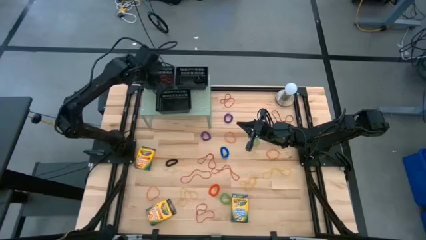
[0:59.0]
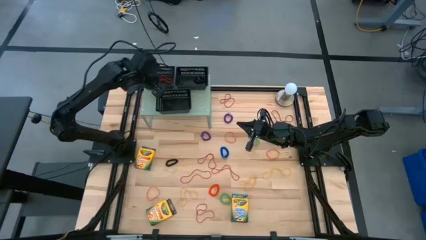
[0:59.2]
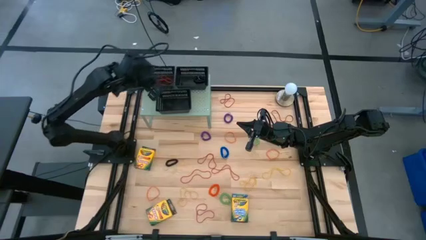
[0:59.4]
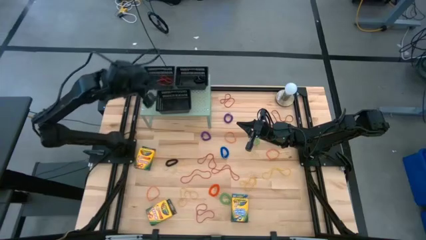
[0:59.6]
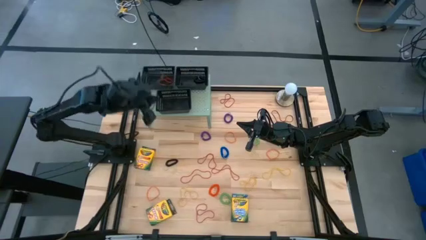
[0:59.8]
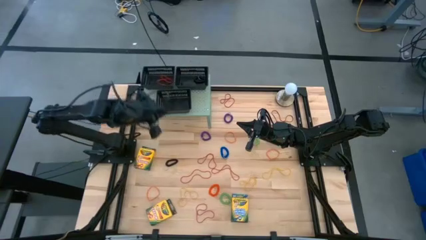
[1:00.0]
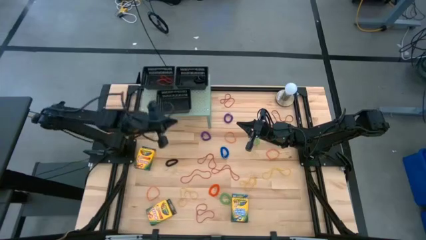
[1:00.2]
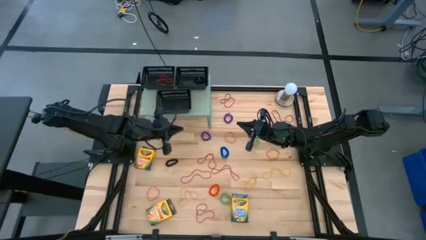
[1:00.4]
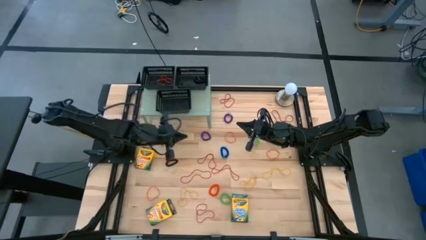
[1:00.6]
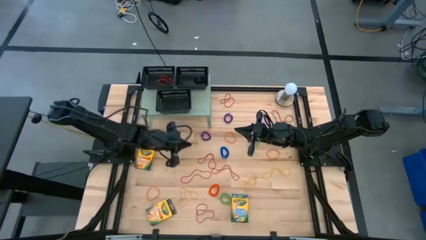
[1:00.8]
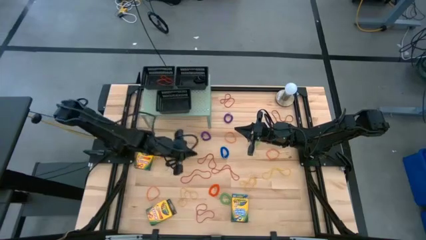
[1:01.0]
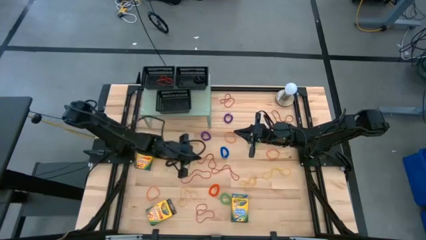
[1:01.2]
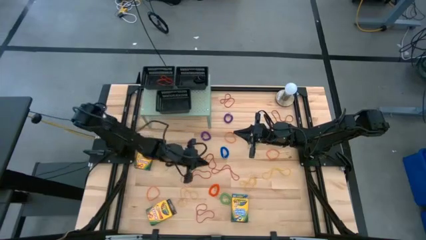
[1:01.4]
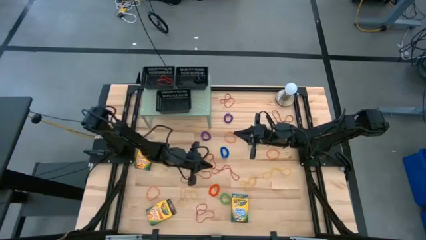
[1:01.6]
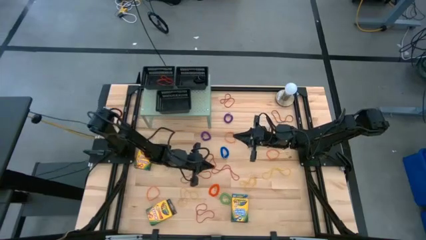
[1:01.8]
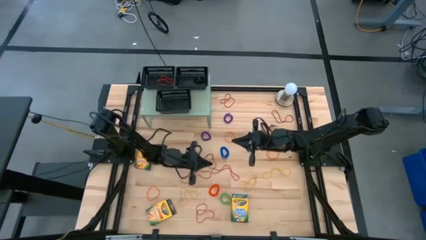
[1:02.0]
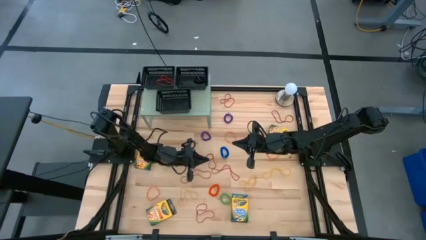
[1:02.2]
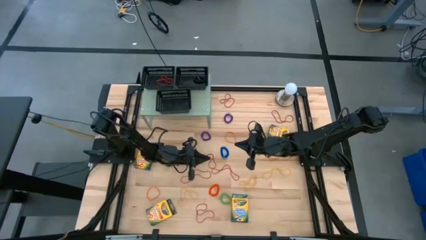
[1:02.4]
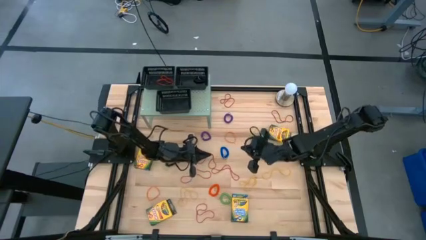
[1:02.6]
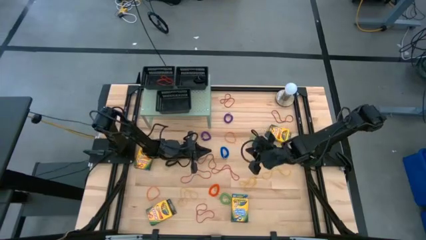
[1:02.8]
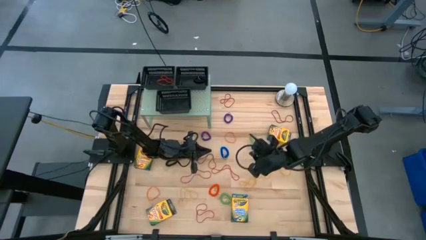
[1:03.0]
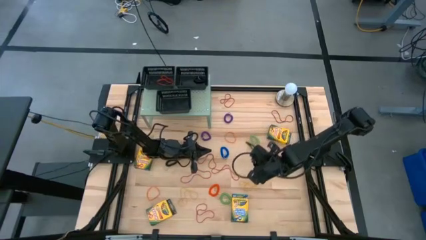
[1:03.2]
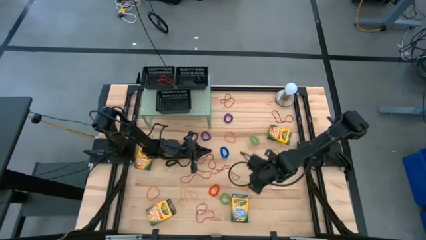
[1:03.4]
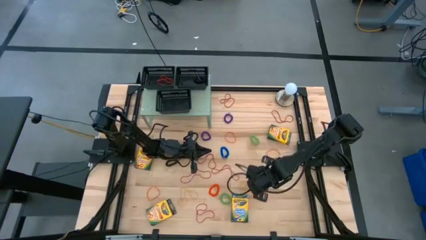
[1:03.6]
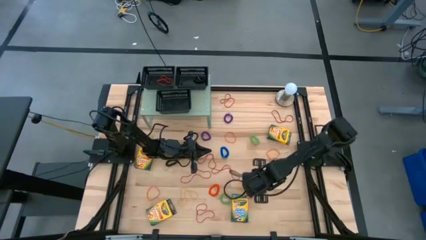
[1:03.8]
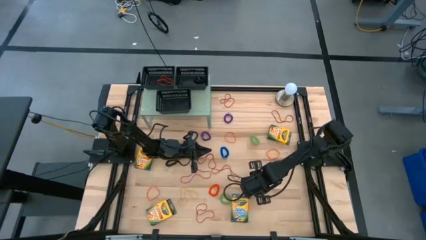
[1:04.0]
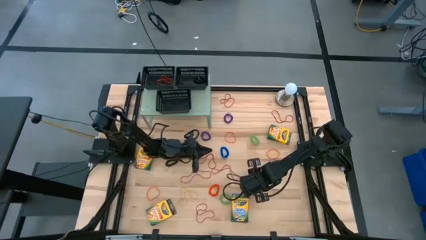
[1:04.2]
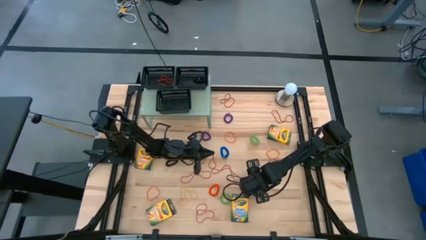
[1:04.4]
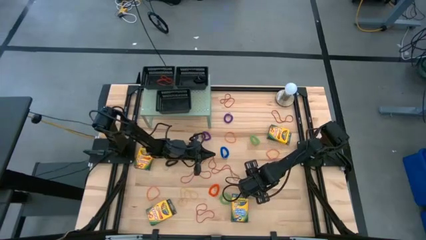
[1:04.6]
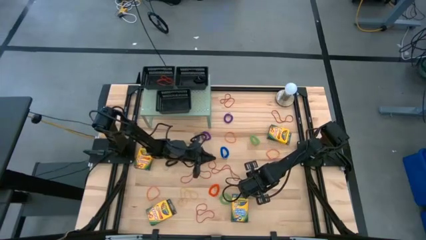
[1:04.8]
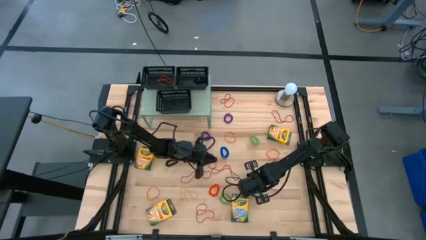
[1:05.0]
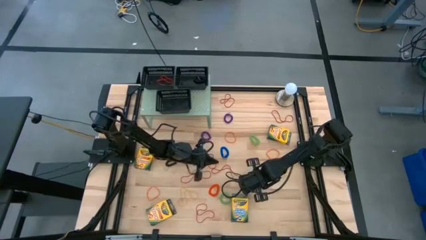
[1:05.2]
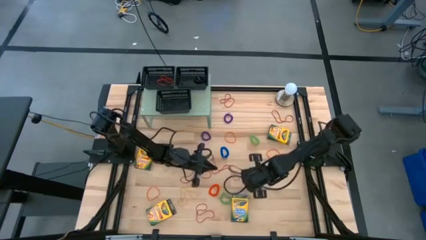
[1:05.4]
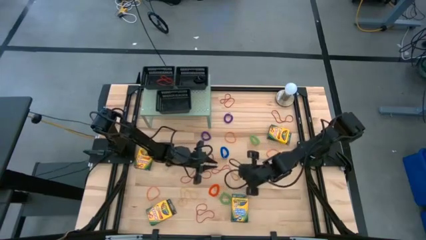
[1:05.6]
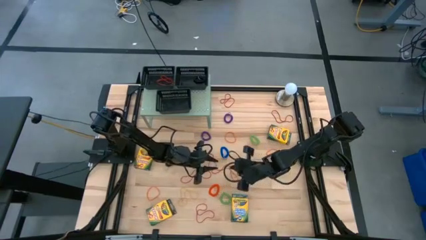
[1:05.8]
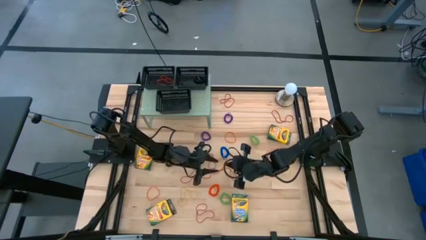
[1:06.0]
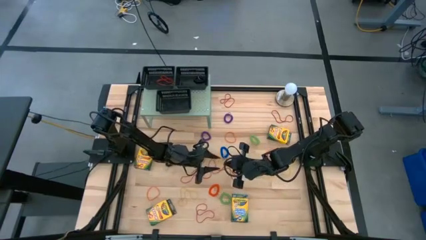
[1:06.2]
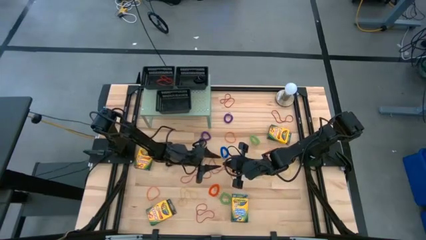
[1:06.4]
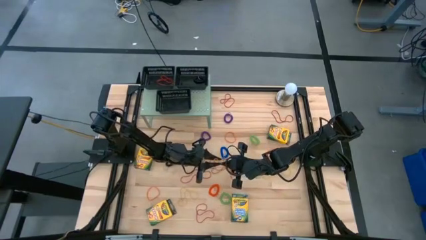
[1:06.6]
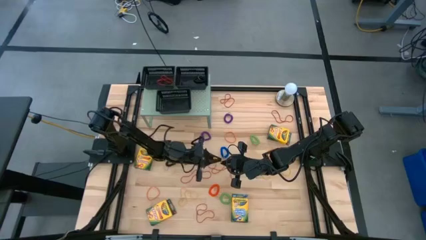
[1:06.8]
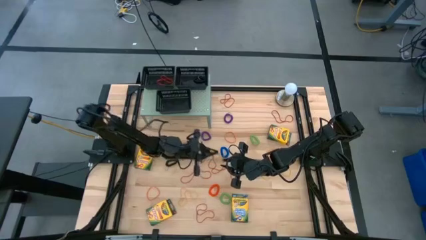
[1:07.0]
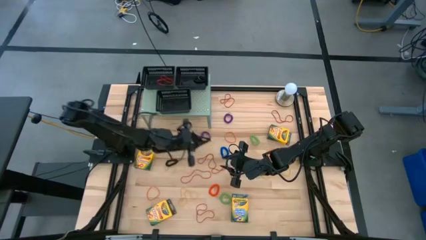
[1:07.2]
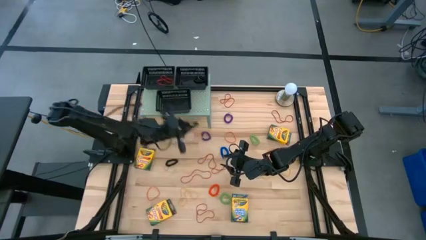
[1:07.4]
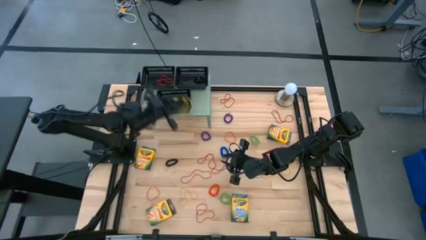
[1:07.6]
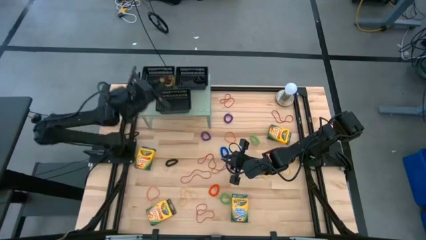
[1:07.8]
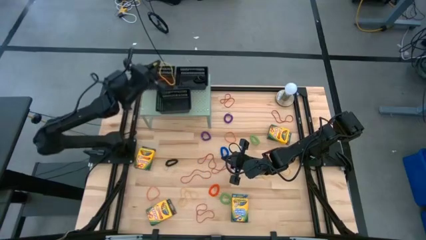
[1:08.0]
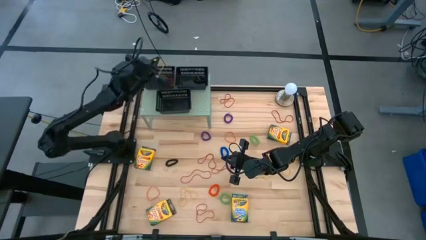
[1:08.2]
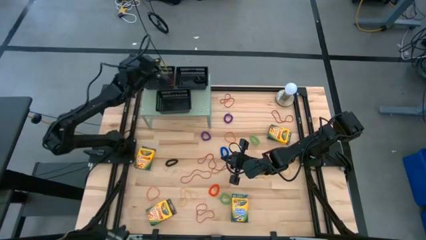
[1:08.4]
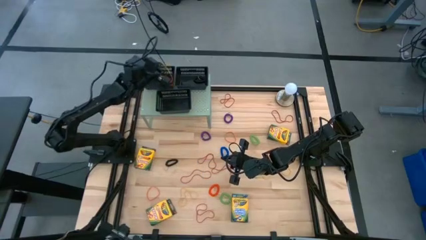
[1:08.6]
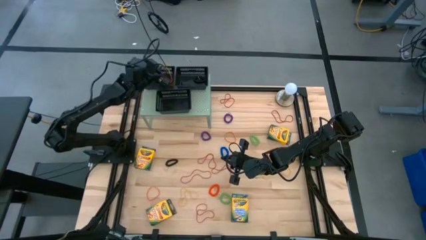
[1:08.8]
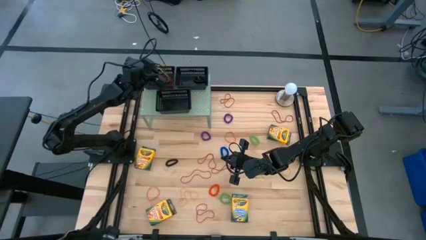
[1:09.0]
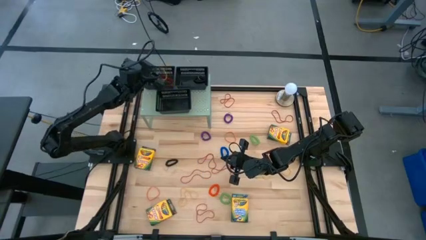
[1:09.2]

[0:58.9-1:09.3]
Task: Pick & Place Office Desk Supplies
Put the yellow rubber band into the top left black bin on the shelf

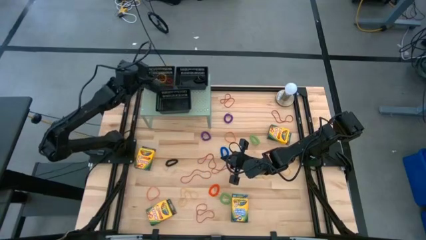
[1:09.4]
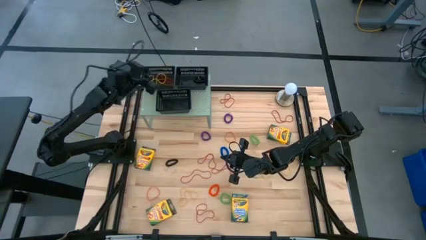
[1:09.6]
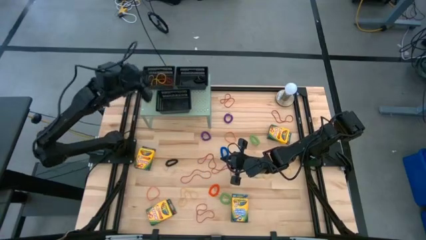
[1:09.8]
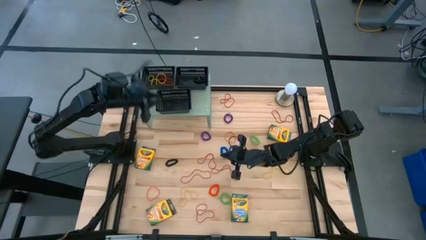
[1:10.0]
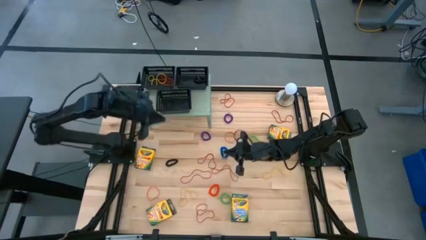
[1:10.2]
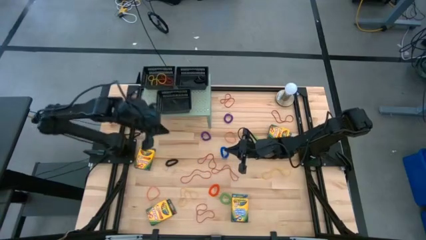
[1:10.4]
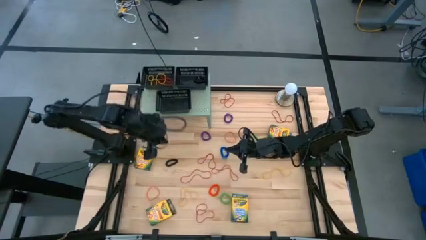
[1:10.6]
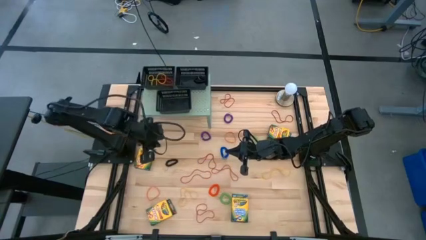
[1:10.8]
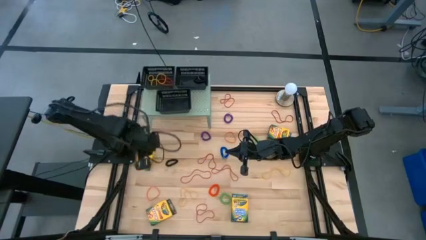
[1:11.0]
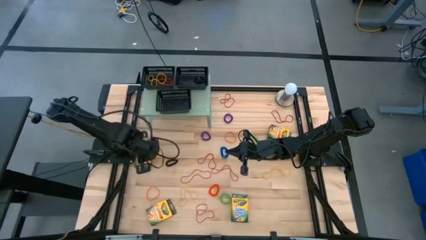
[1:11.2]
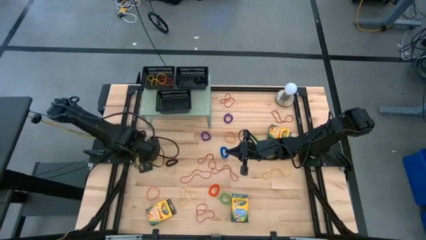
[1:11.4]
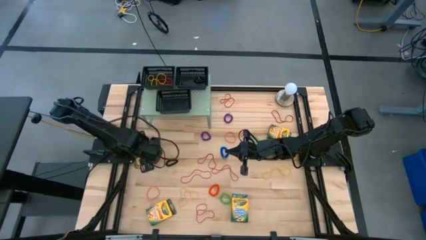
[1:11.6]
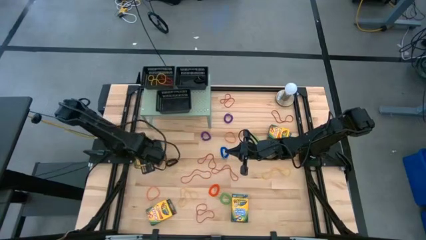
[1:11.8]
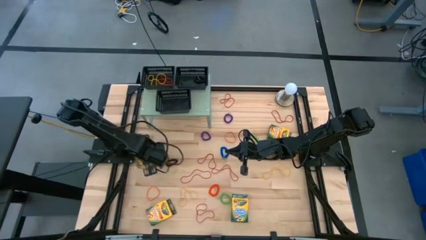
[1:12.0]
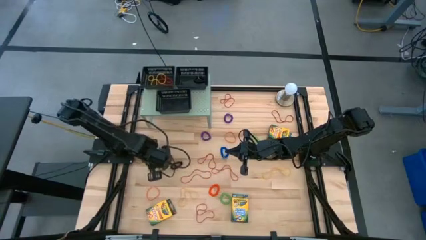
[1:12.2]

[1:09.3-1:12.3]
Put the crayon box into the bottom black bin on the shelf
